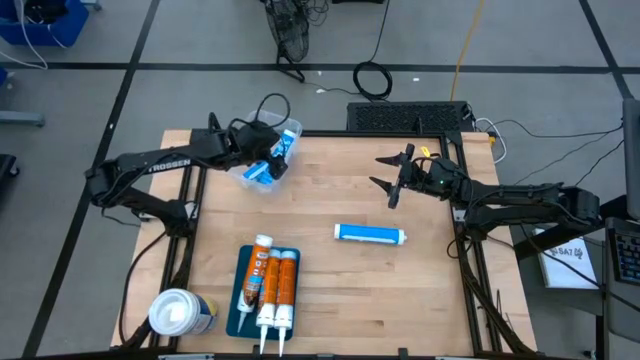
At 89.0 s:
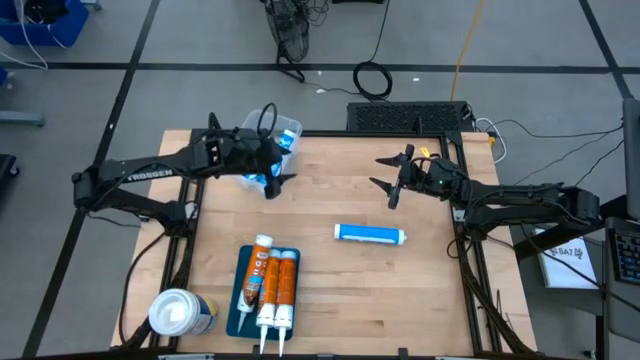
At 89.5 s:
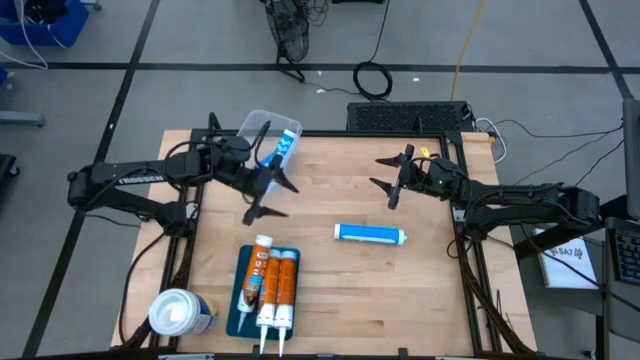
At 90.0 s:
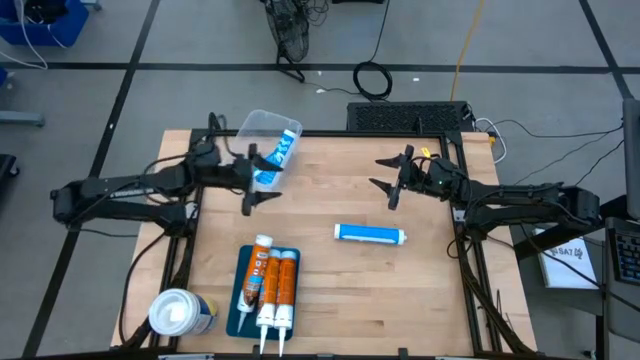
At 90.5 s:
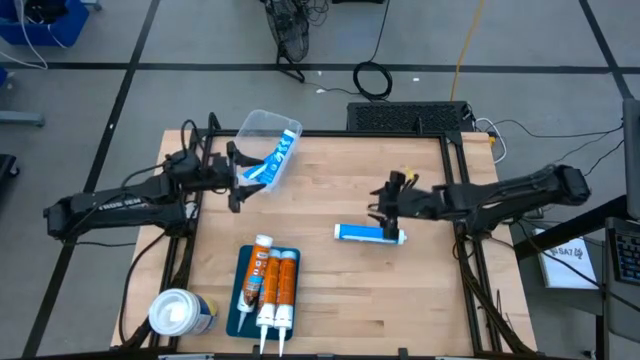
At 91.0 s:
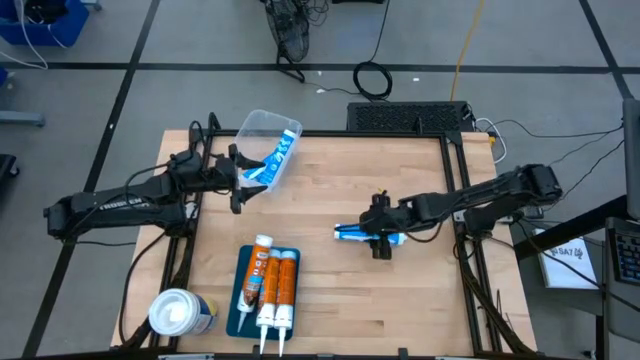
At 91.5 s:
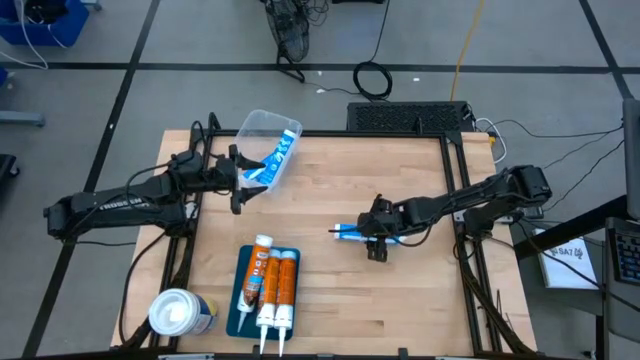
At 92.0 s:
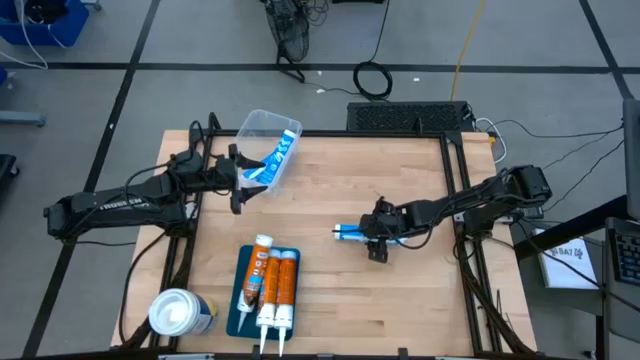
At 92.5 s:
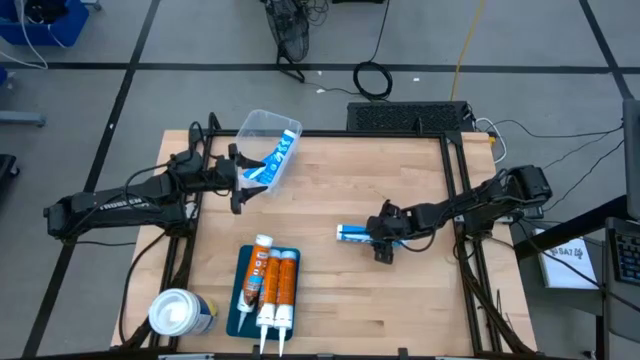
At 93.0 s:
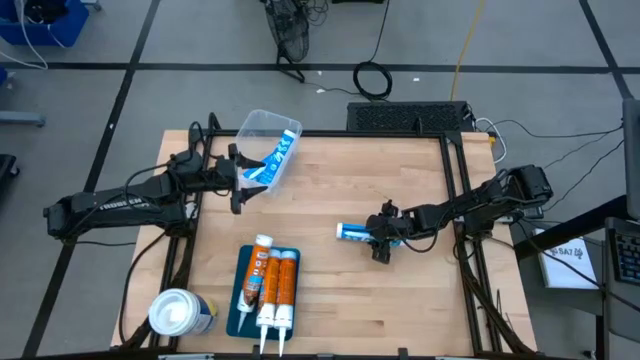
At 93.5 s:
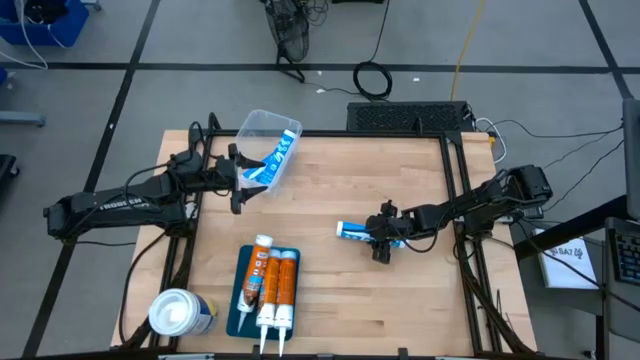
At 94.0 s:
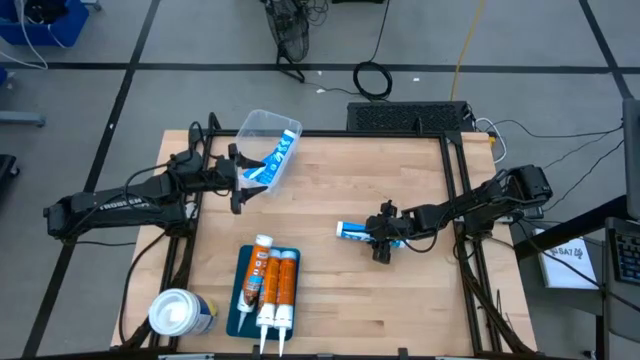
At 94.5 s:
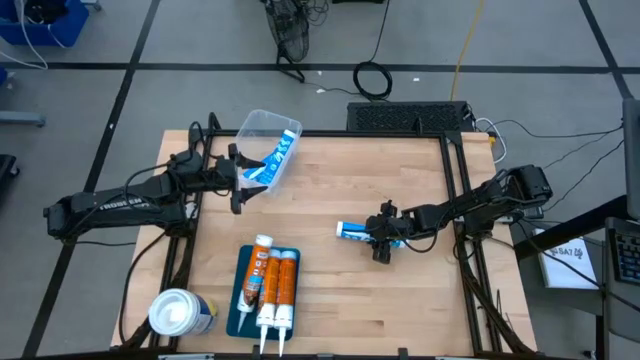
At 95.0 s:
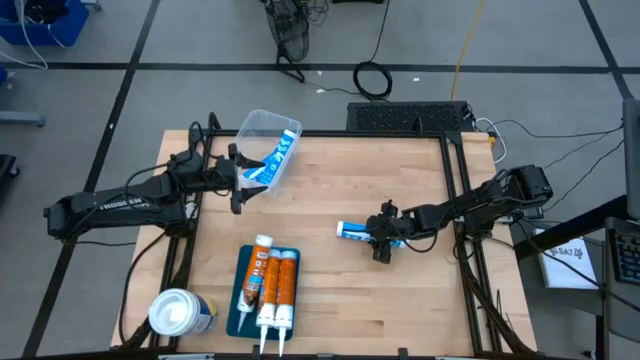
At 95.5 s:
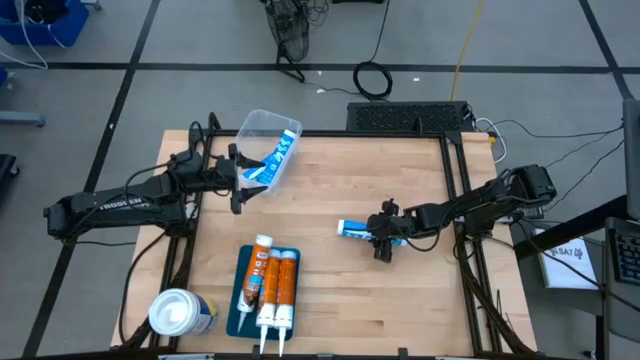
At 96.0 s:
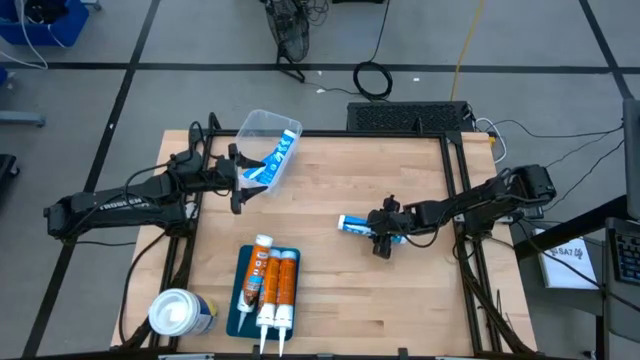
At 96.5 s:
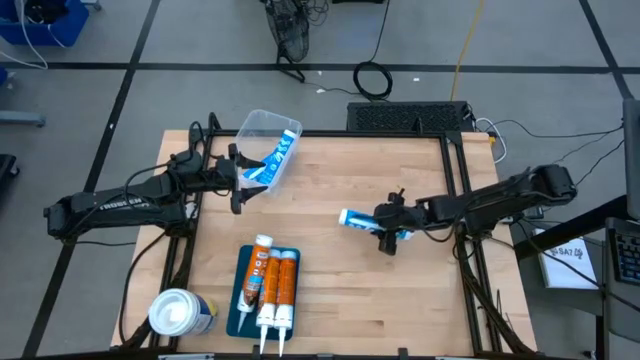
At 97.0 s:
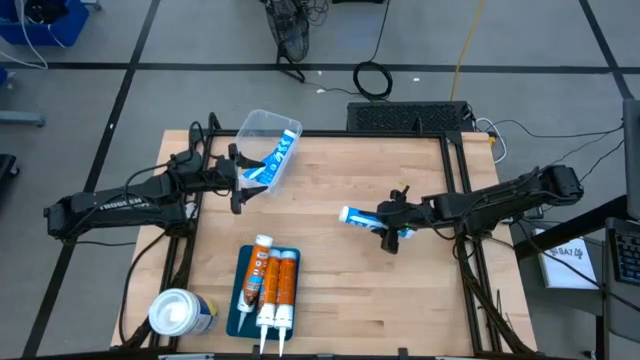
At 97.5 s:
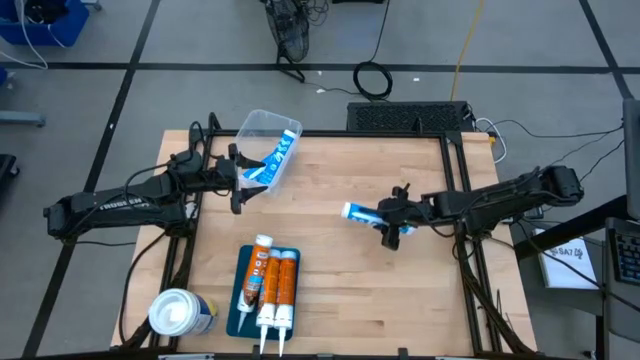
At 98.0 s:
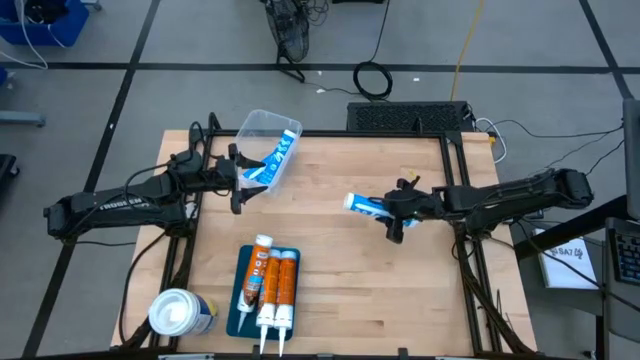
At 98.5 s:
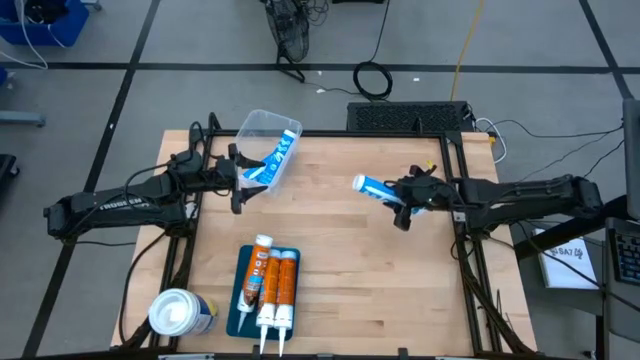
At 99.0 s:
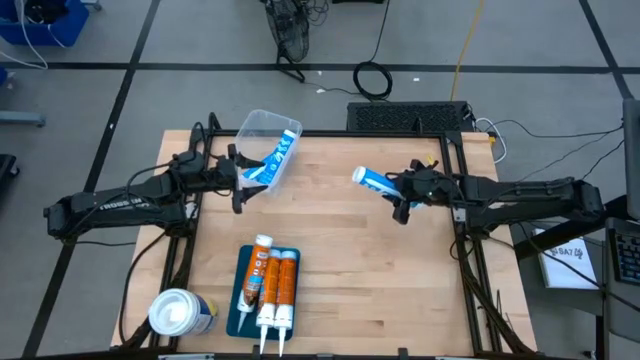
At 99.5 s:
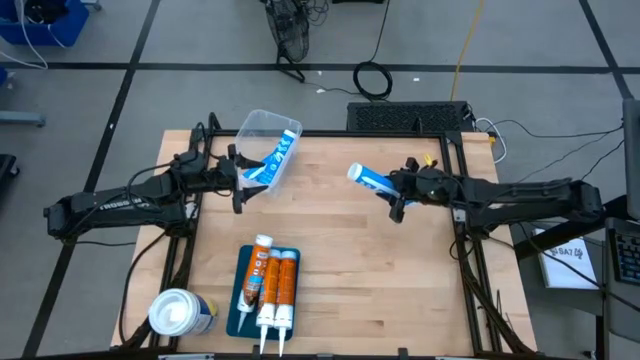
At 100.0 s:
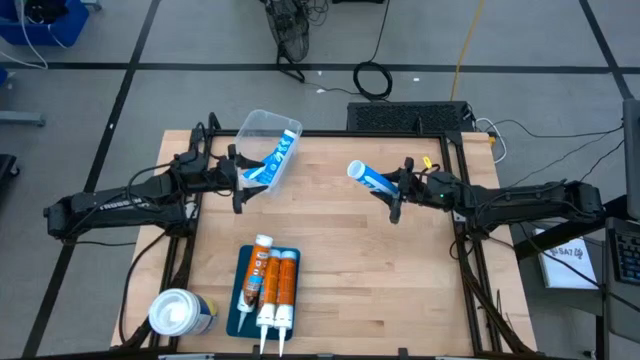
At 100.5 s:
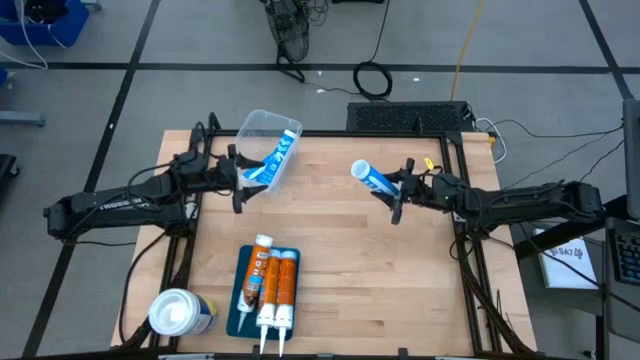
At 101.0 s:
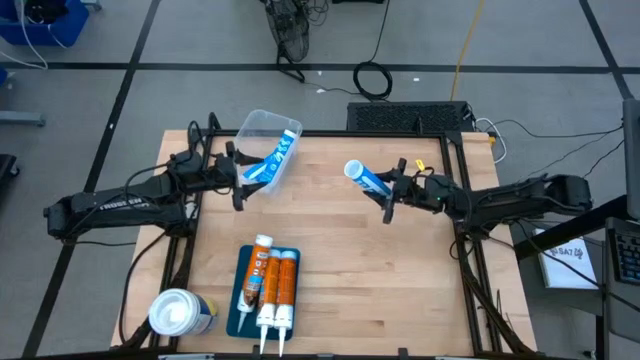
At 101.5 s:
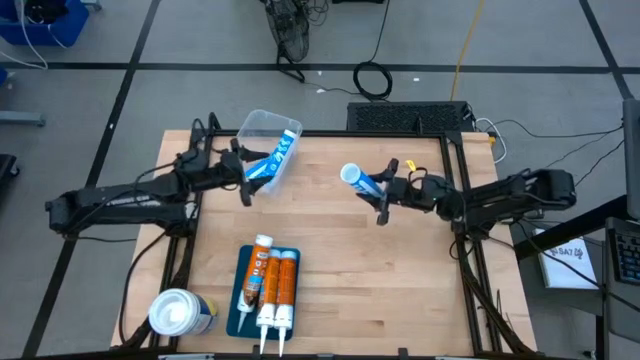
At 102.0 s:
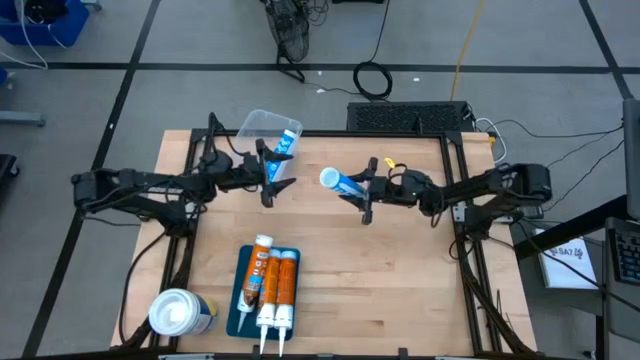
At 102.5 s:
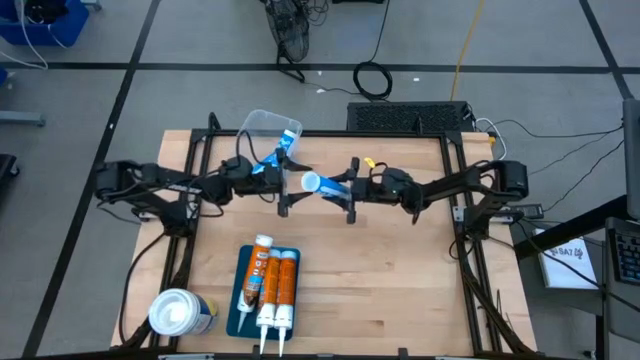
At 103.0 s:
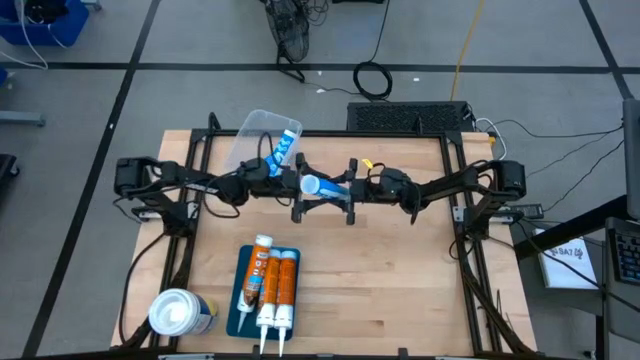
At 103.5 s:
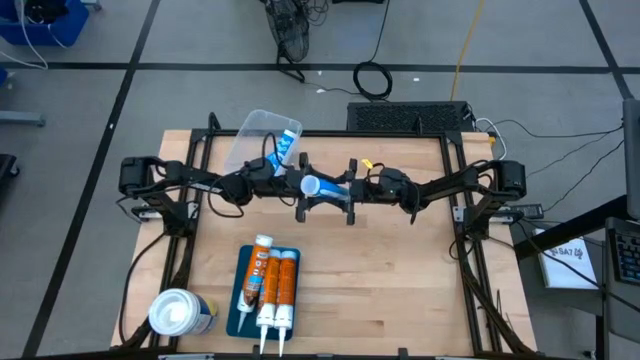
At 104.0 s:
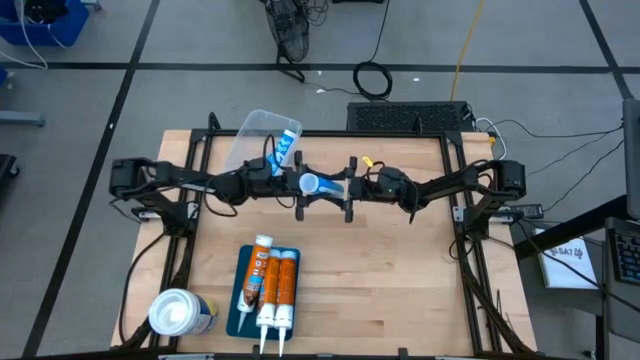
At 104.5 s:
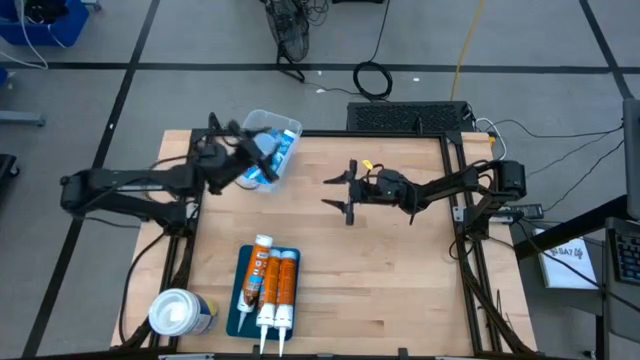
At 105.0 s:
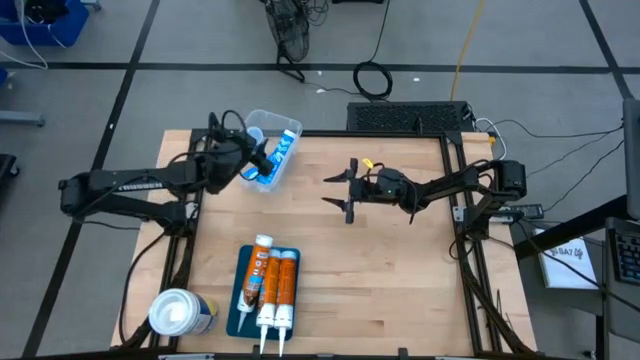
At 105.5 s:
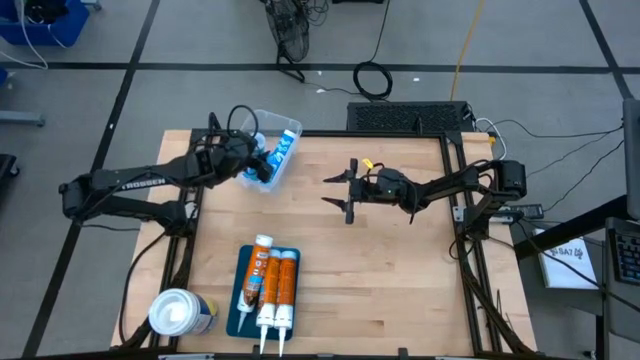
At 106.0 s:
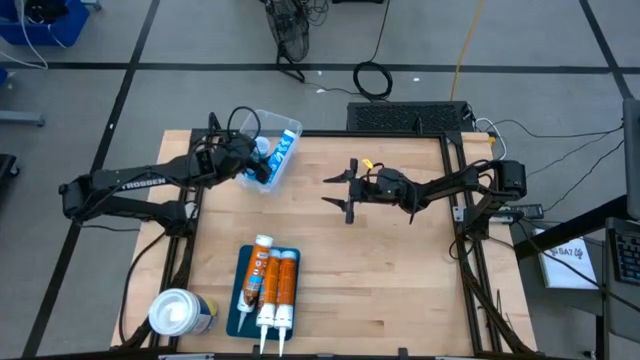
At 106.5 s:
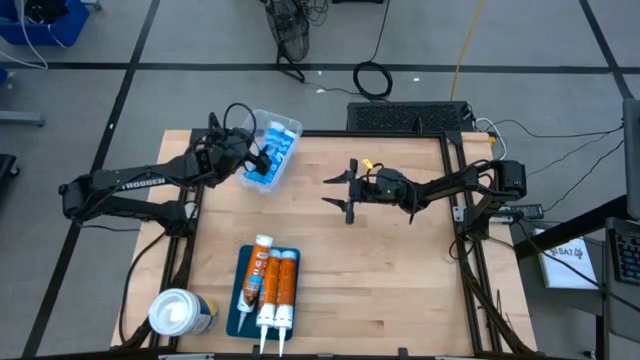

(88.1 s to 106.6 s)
Task: Pick & place silicon tubes, Sealant and Lysol wipes
Put the blue sealant into the white bin

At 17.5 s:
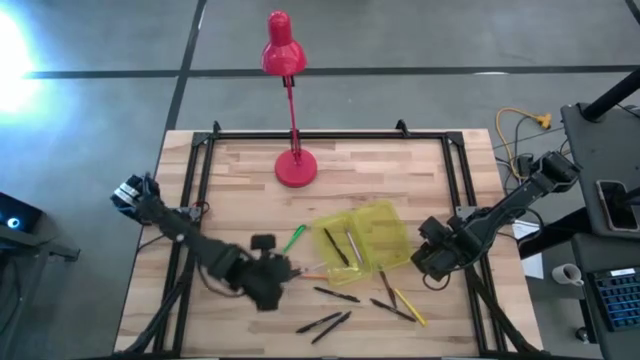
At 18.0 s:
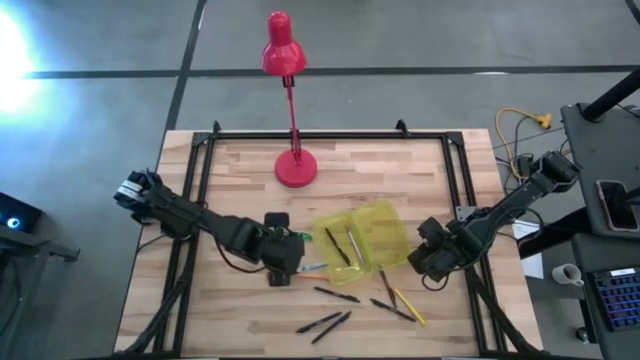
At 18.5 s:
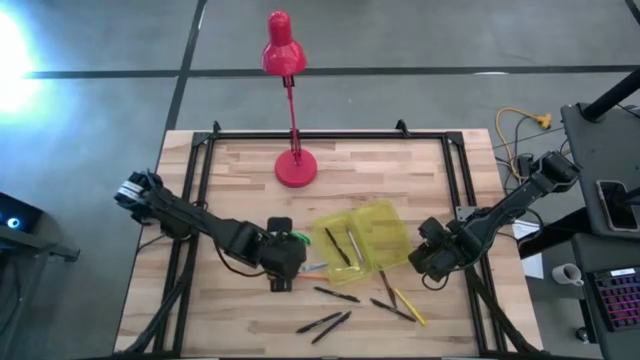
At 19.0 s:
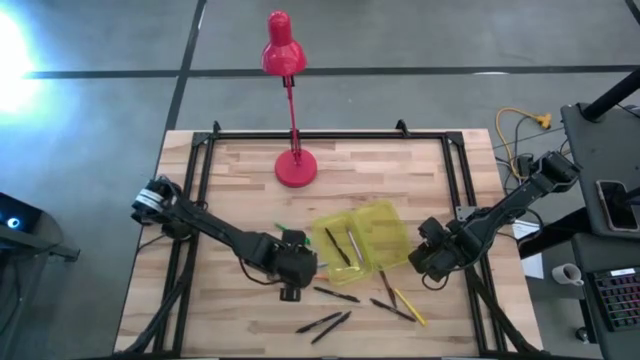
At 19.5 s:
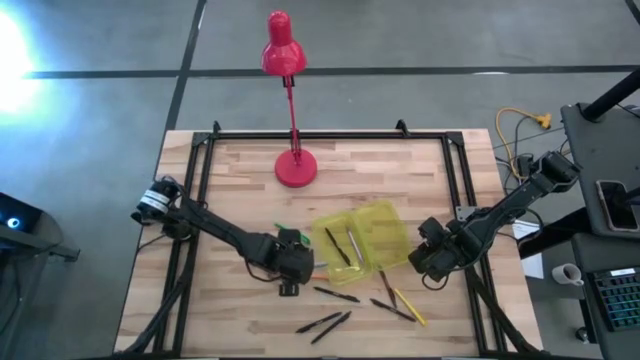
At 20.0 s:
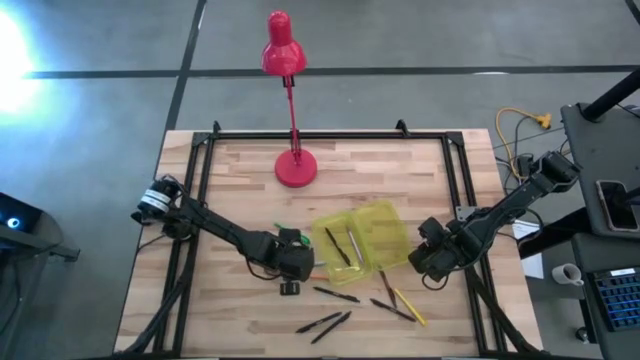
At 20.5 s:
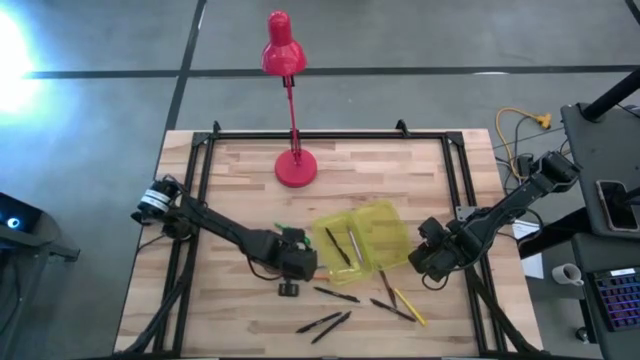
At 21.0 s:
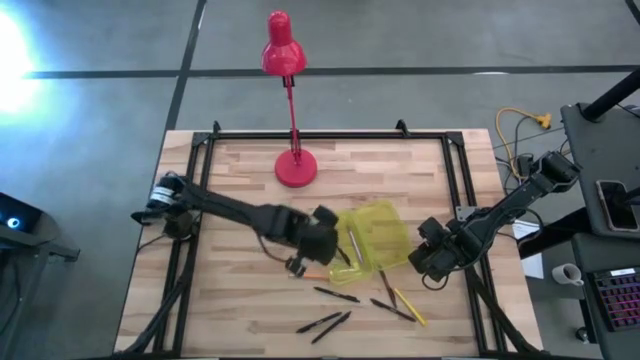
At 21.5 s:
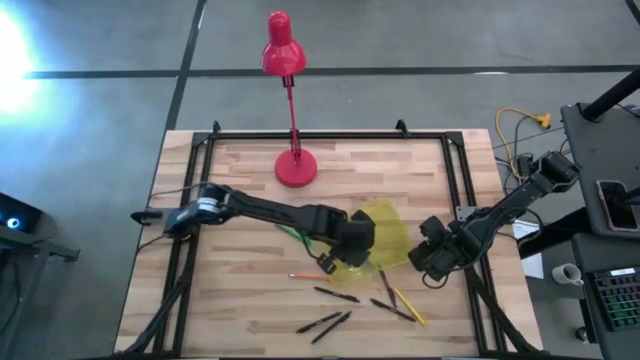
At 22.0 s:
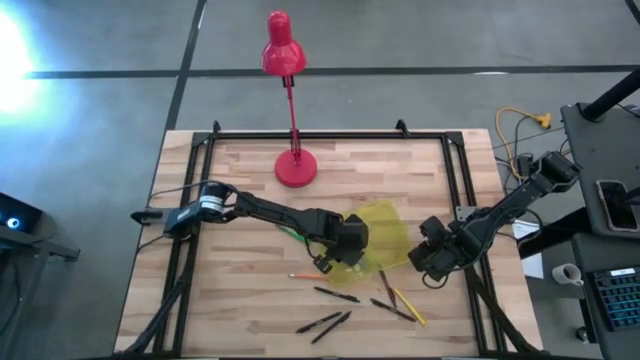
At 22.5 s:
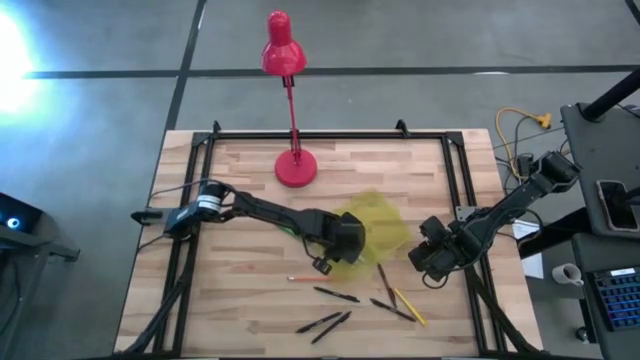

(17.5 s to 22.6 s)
Task: Pick & place school supplies into a supply box
Put the black scissors into the yellow supply box
